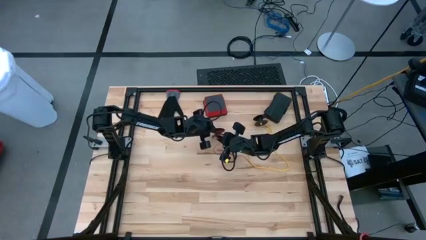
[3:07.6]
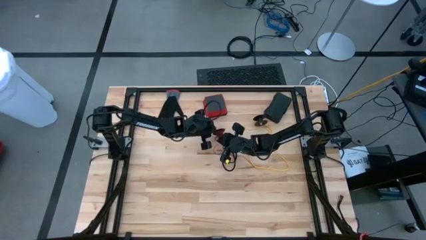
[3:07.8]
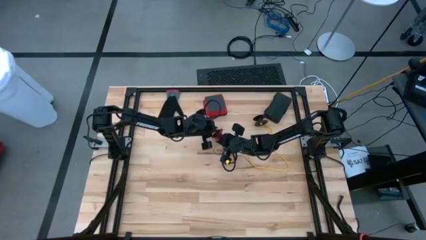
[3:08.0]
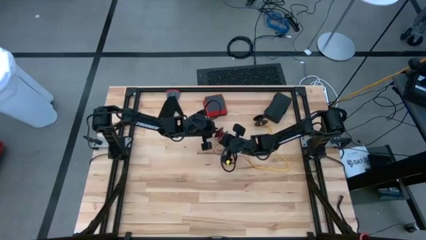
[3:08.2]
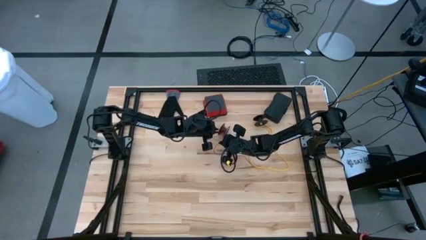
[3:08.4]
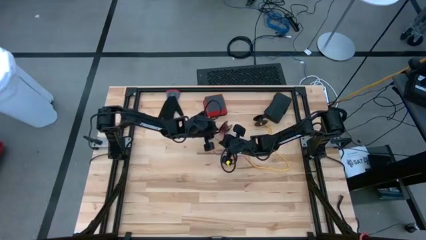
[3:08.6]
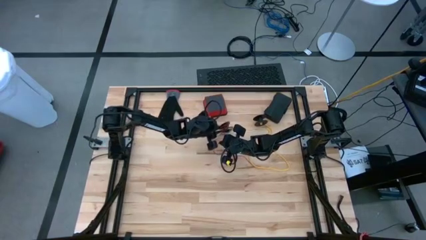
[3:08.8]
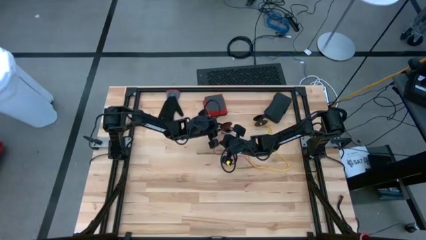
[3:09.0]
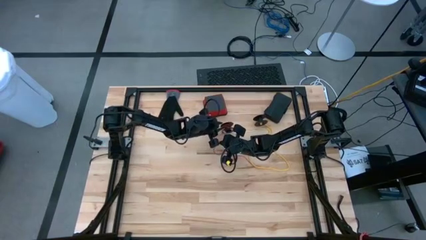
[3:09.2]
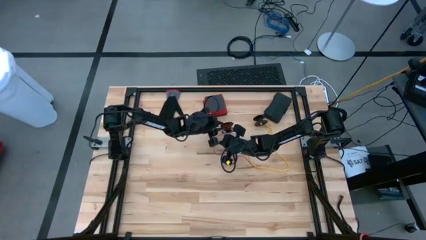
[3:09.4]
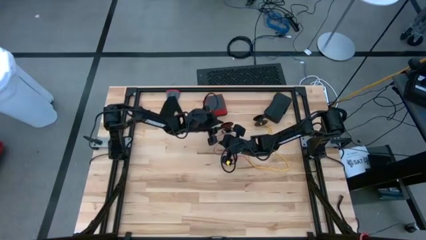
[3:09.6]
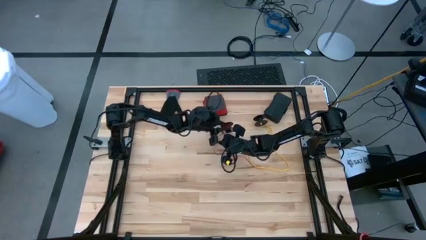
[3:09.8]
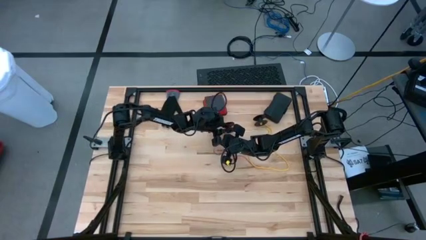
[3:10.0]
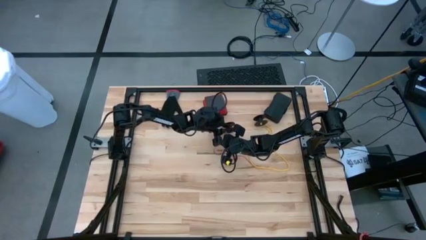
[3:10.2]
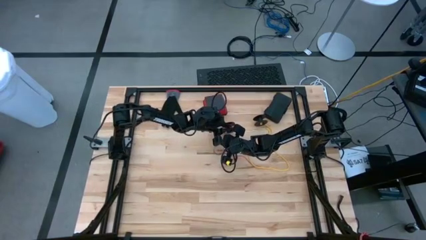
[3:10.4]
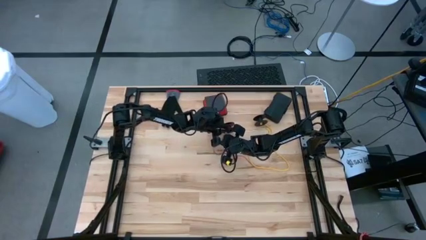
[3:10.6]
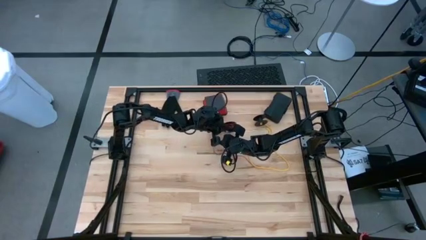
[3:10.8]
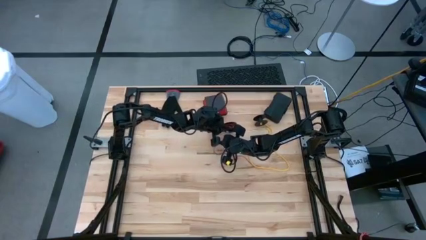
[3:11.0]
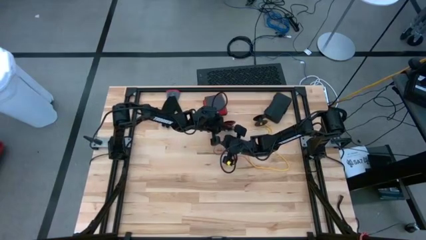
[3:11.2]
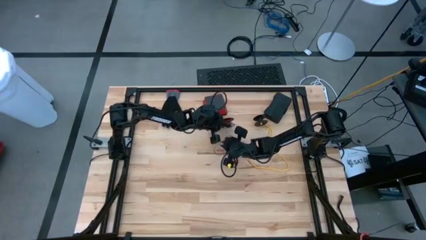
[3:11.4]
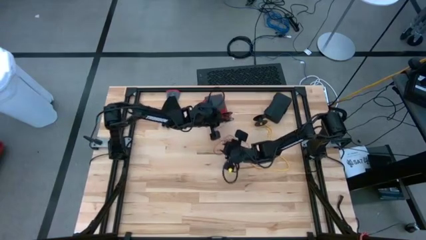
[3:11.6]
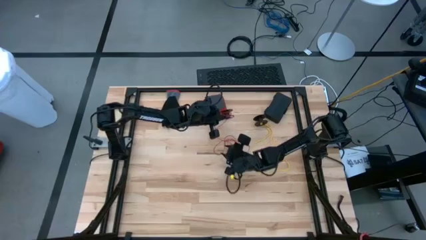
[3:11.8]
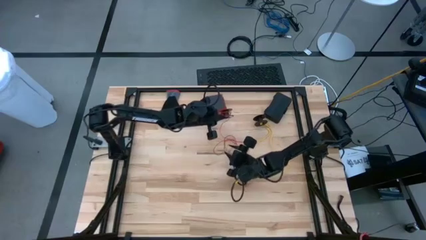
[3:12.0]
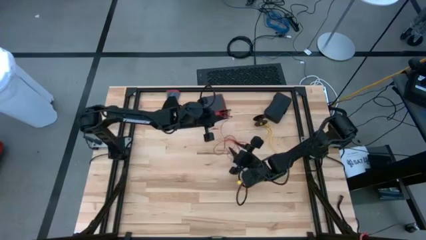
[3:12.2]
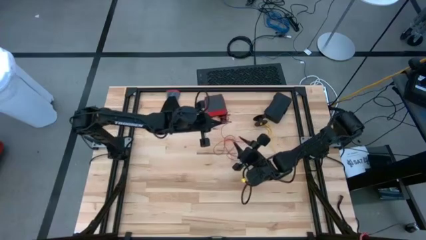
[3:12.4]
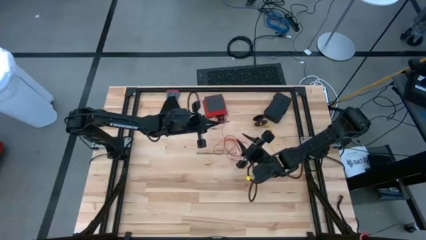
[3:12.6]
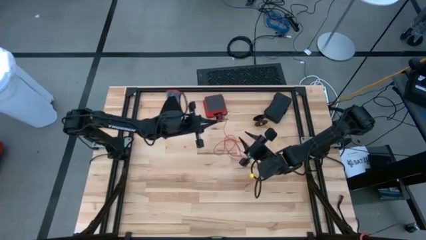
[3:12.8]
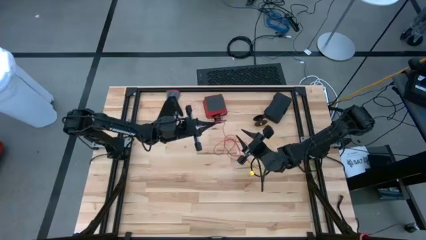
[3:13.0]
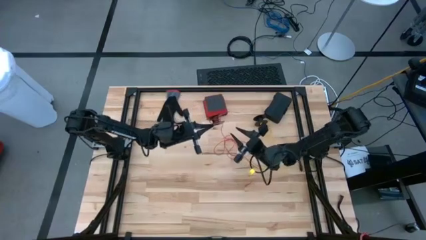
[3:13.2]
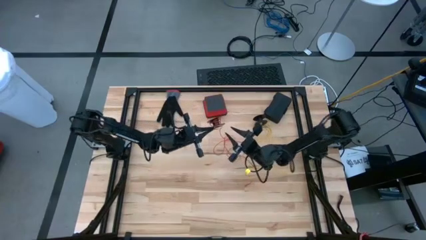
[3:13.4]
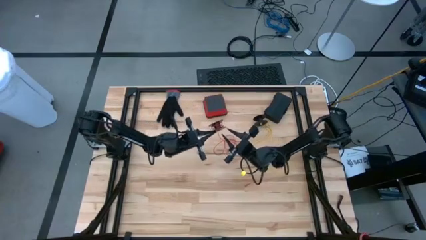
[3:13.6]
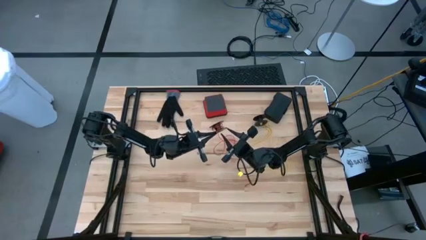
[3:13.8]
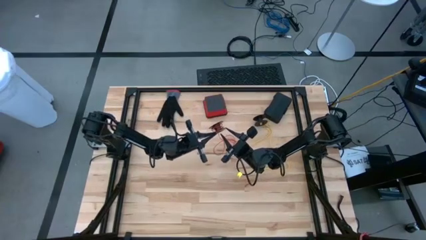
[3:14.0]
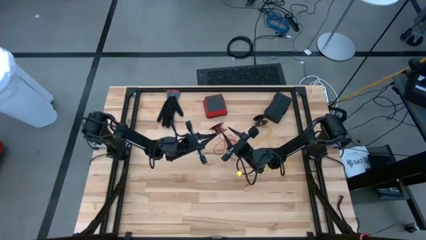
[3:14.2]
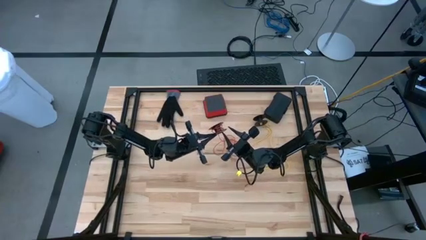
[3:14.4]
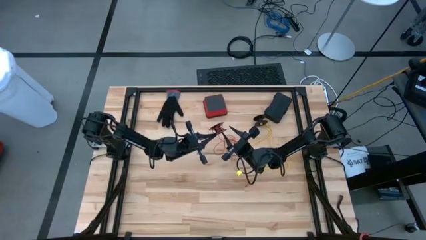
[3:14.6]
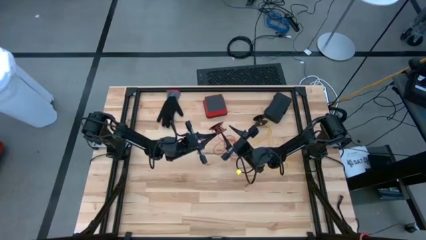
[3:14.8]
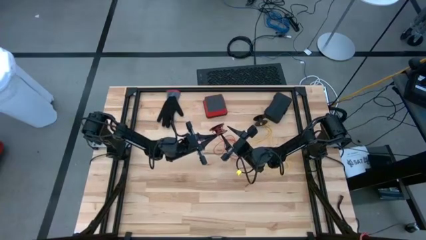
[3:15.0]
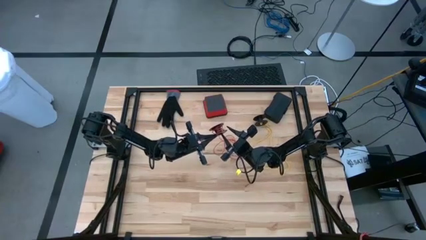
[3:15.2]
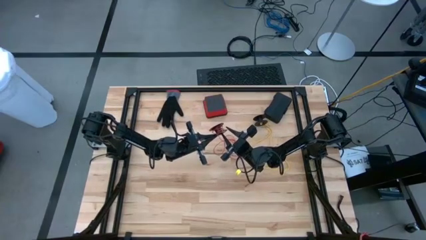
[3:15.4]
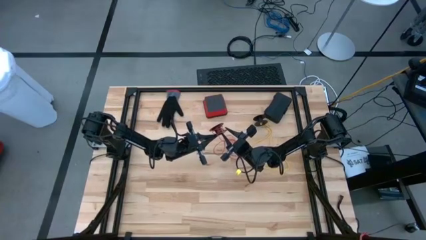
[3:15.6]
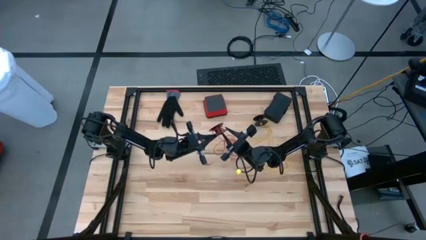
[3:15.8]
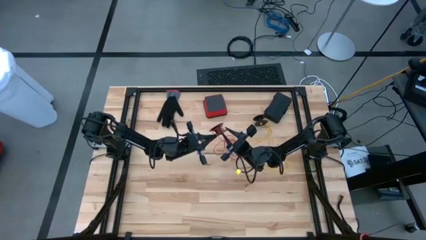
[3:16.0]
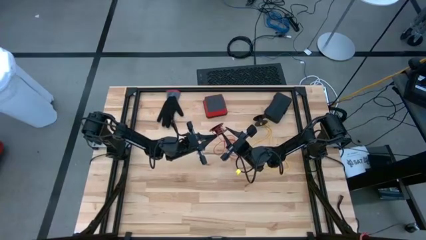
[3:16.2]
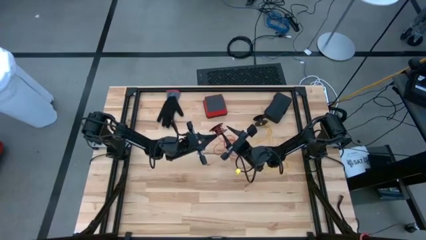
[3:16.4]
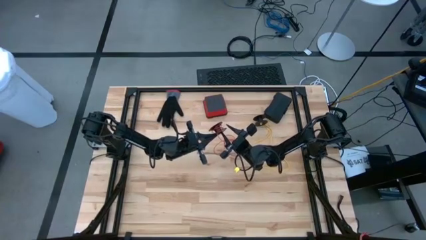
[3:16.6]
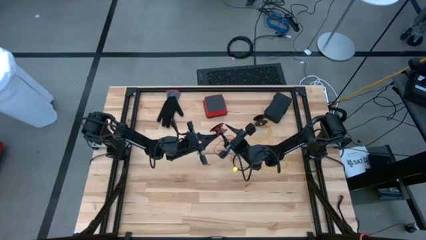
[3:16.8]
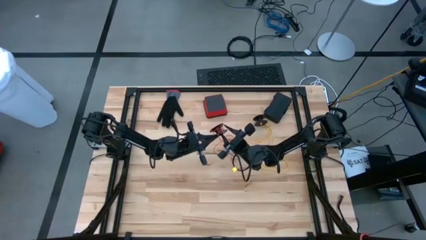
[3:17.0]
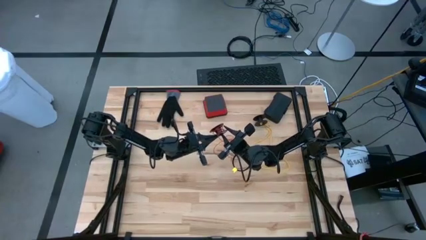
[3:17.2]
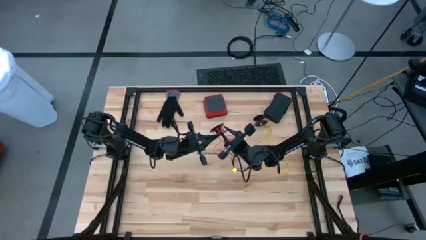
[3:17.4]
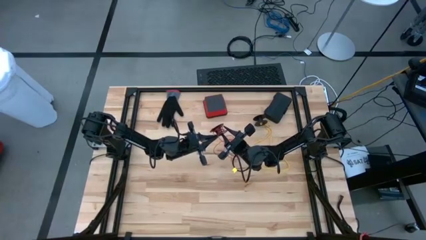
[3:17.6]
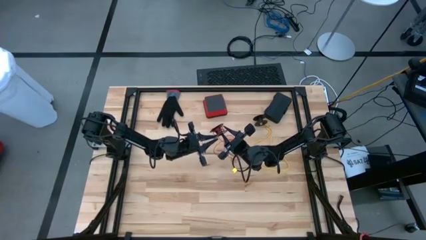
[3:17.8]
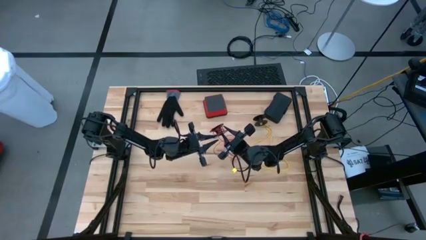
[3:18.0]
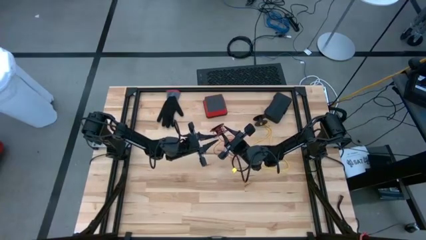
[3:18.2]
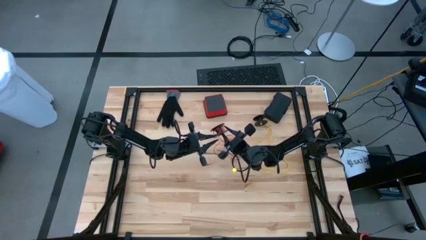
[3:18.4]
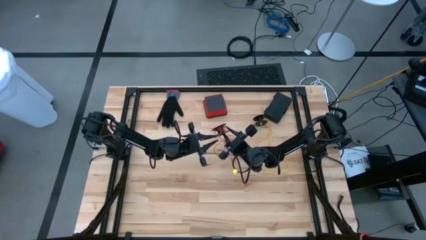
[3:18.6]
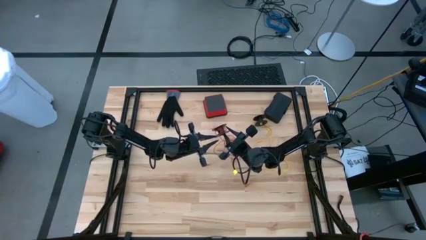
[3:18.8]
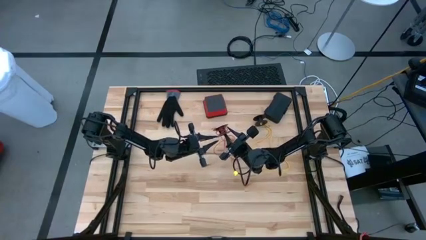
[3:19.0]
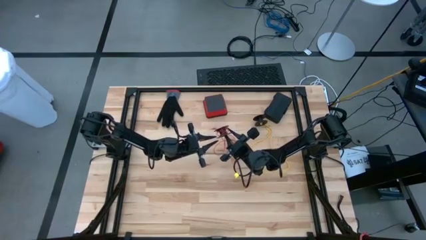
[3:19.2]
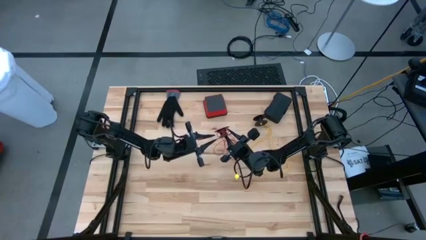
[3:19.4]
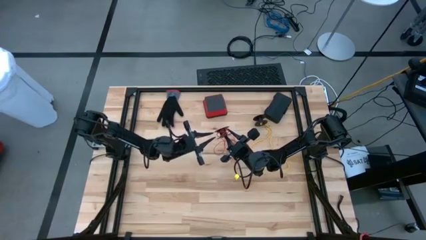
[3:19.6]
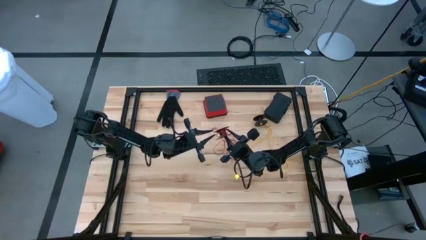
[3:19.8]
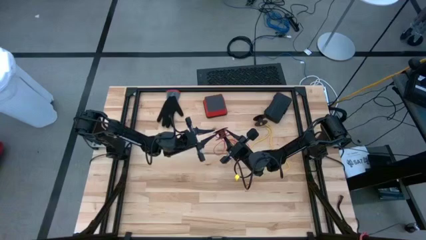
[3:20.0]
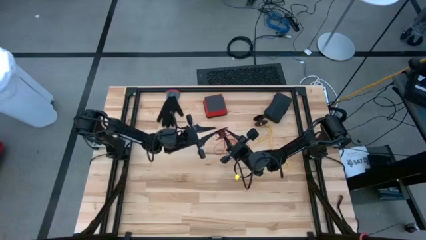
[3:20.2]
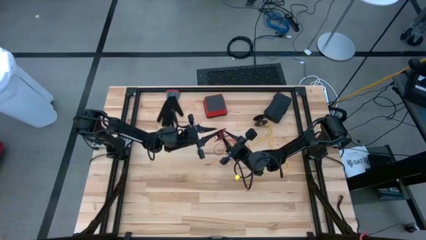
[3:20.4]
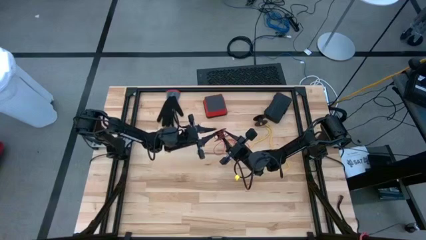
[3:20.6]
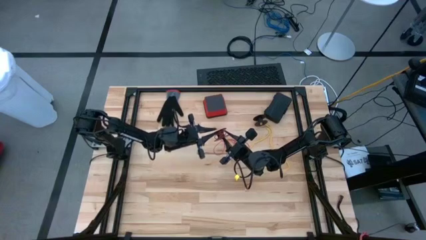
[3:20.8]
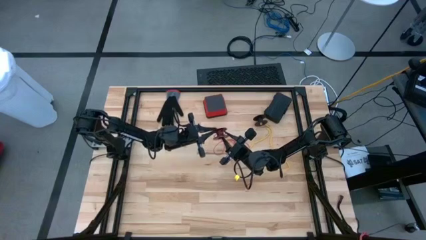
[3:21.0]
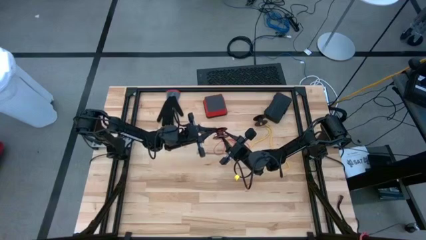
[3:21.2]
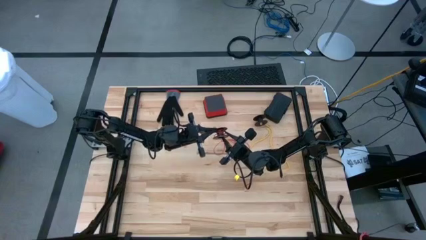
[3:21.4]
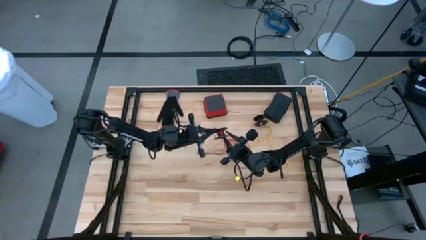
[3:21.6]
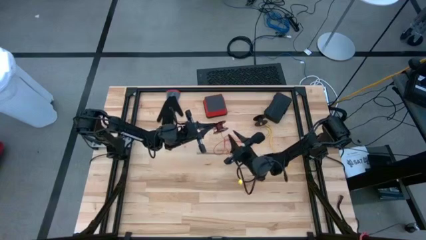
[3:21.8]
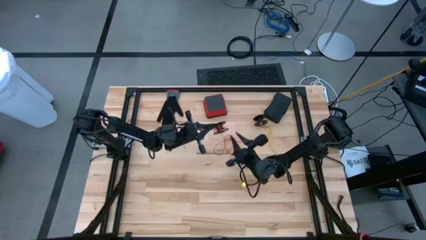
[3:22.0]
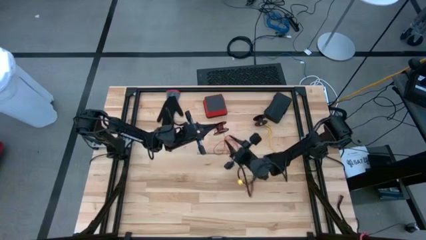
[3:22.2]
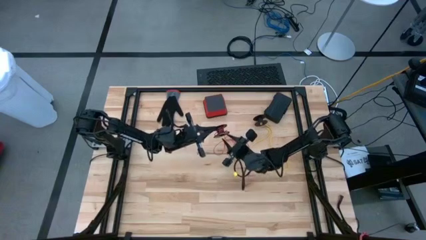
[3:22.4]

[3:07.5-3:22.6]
Task: Coil cords
Uncoil the red wire from the spool

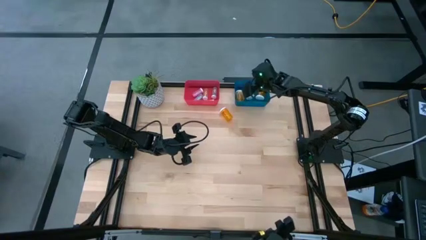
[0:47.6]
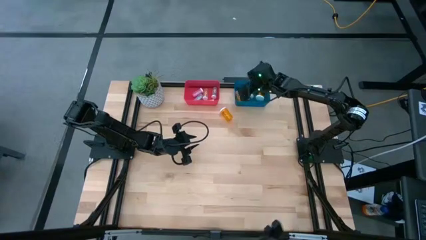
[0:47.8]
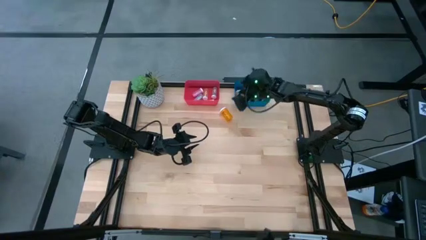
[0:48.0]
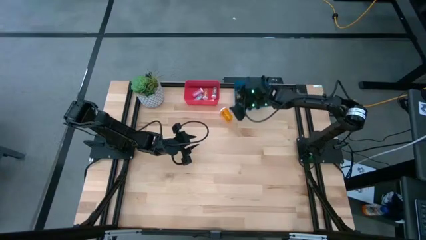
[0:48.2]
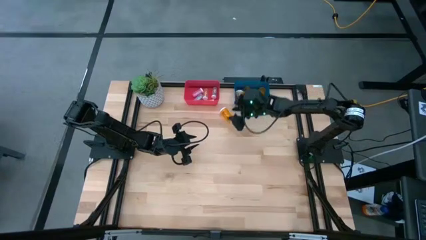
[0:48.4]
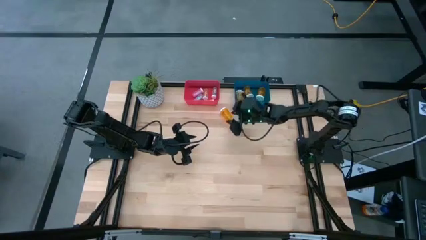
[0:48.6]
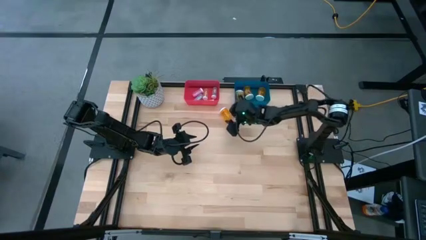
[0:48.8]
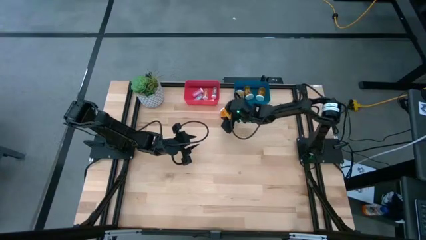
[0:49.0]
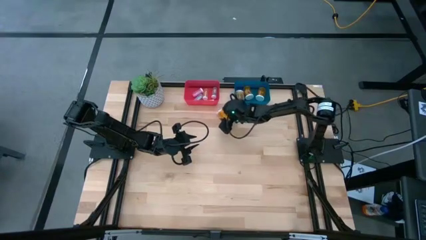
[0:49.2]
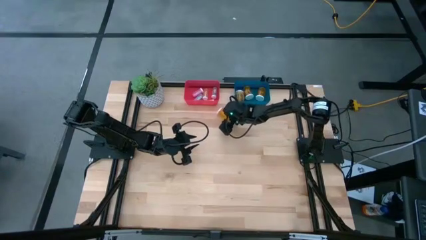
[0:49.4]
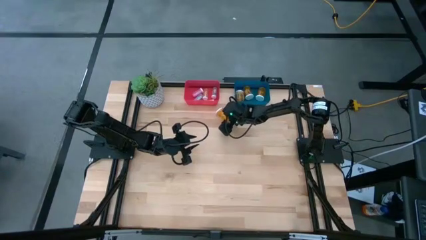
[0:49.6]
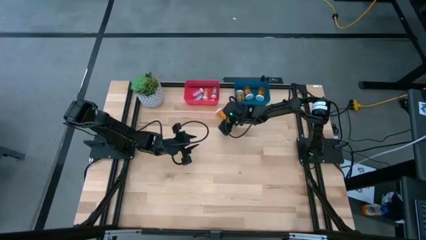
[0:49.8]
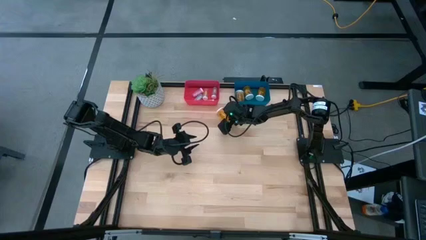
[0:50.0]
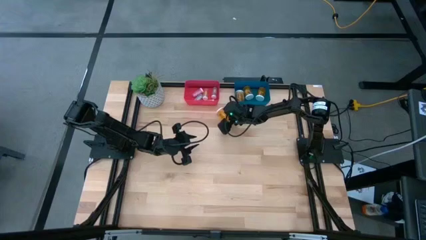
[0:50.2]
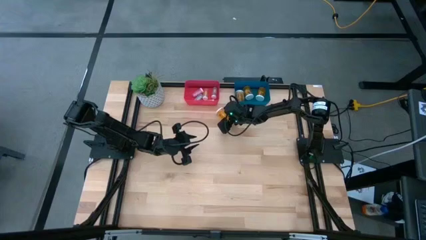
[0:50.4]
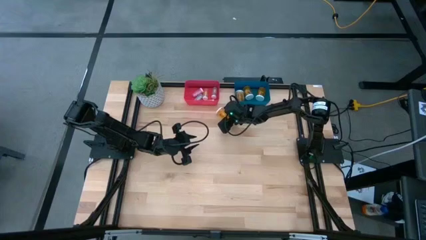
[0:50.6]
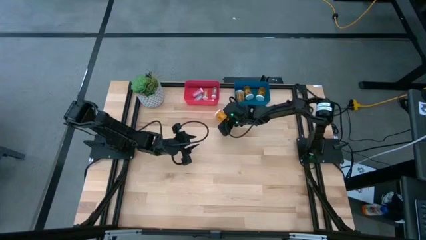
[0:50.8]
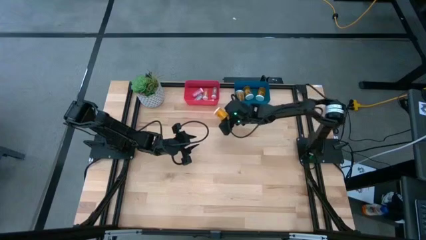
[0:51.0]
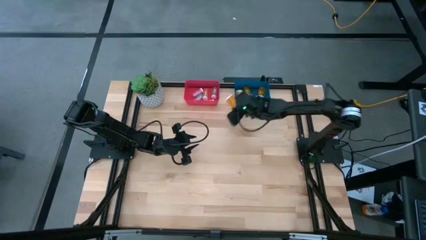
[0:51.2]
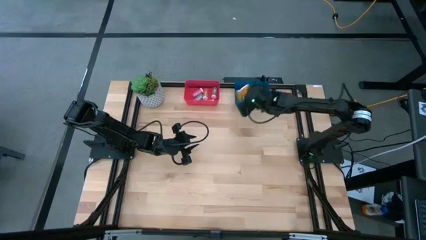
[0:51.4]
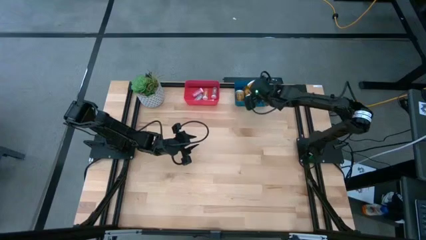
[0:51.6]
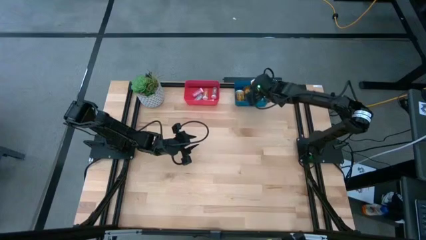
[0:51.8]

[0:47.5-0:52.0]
Task: Pick and place medicine bottles into bin by pill shape (circle, oval)
Put the orange pill bottle into the blue bin
